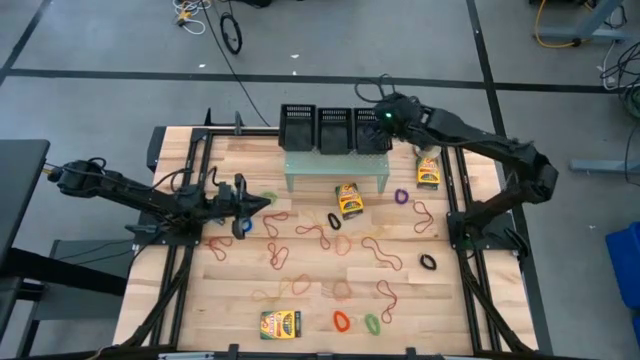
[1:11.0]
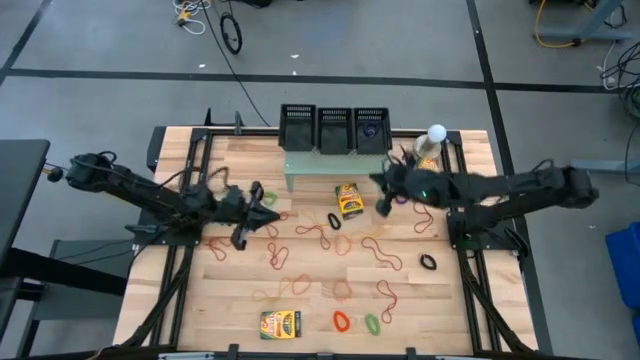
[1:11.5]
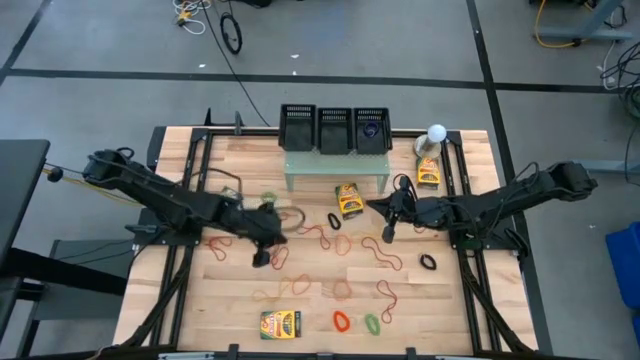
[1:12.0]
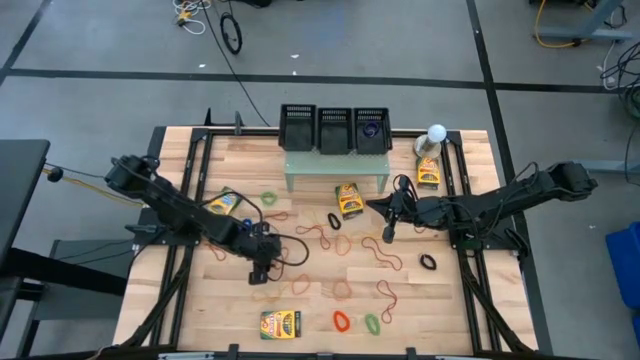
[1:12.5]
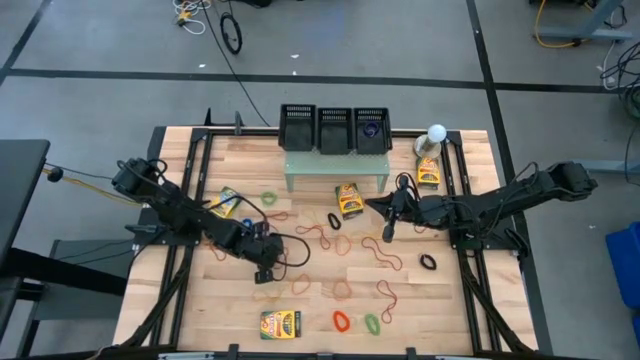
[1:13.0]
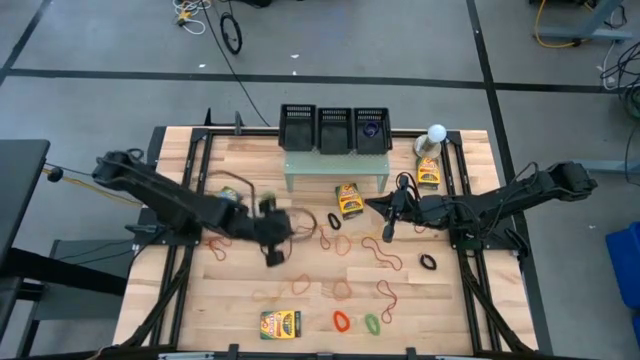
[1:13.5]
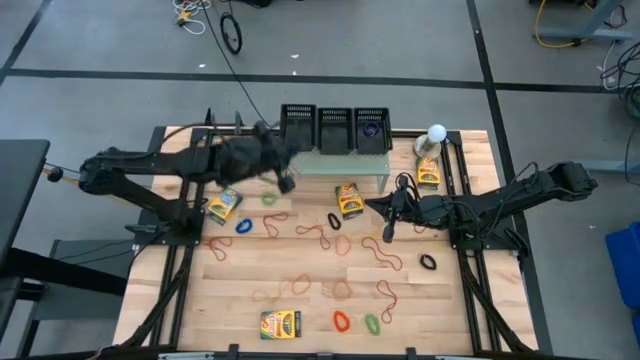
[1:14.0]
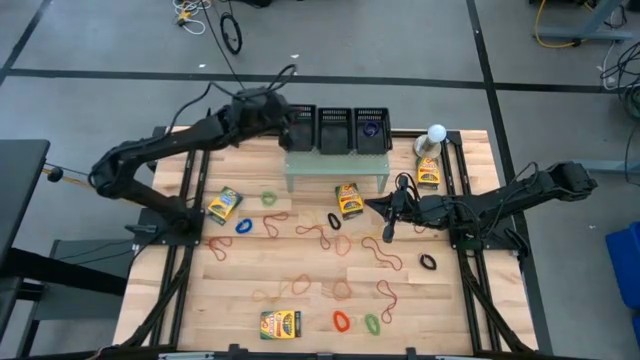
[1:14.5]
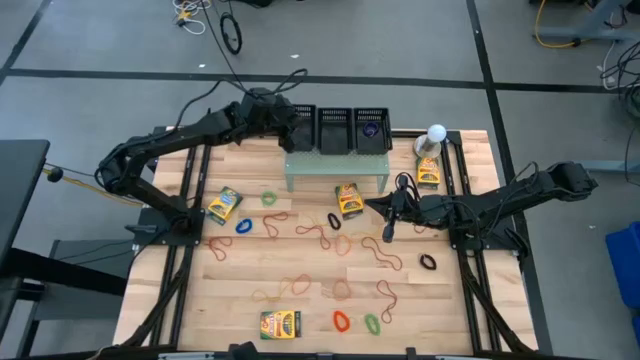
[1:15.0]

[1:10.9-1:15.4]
Task: Pick & Place Office Desk Supplies
Put the red rubberband into the left black bin on the shelf

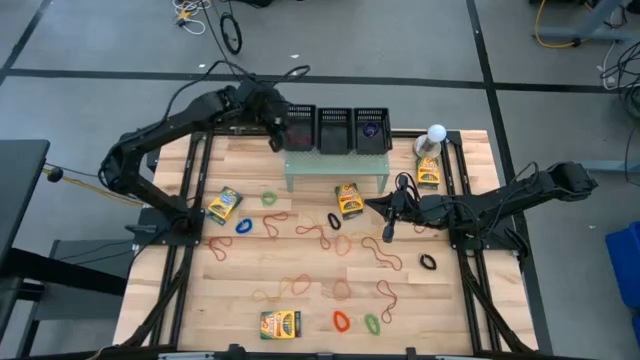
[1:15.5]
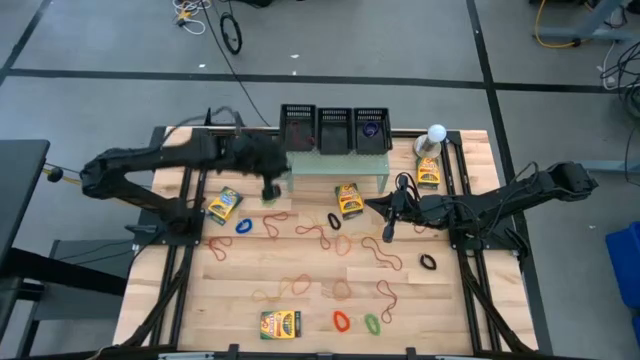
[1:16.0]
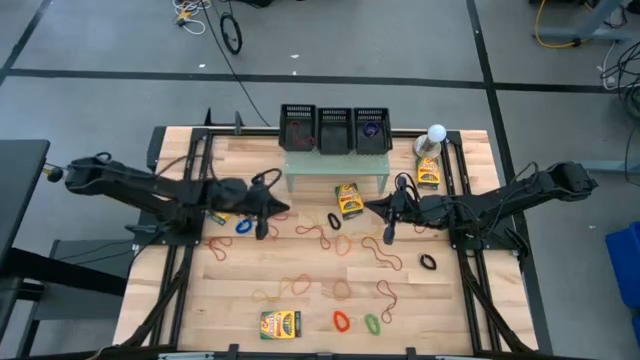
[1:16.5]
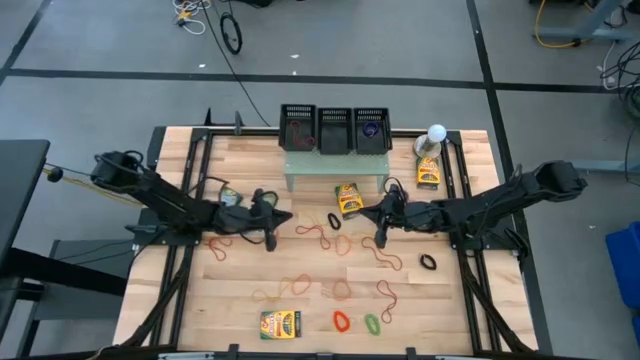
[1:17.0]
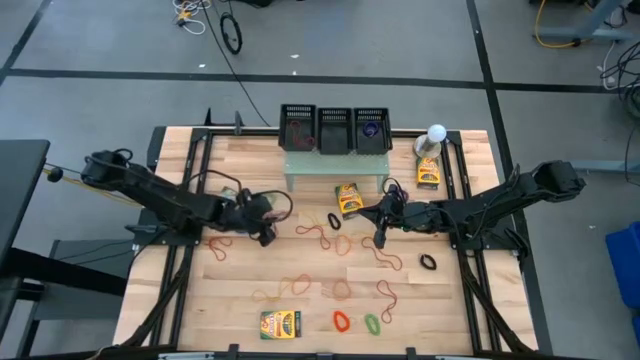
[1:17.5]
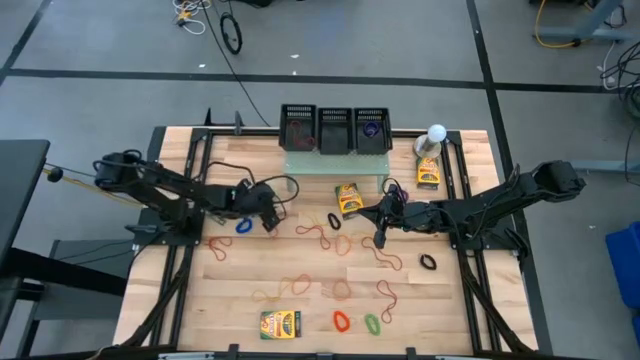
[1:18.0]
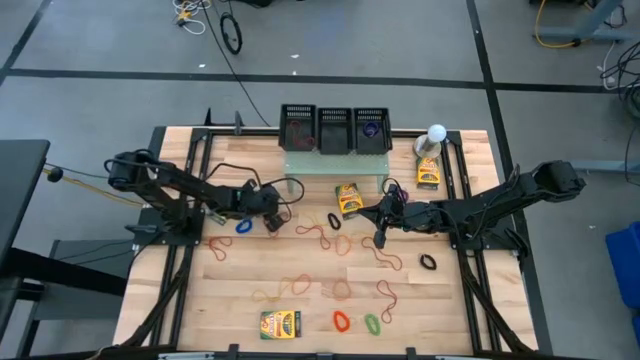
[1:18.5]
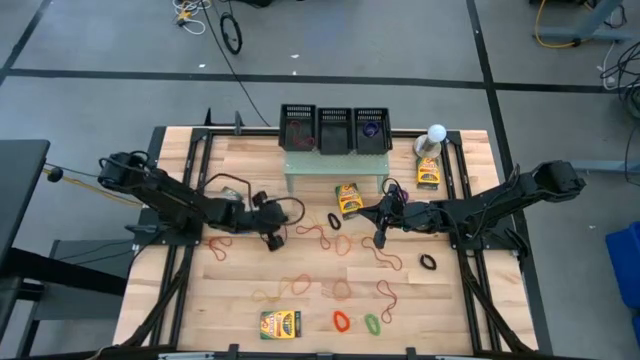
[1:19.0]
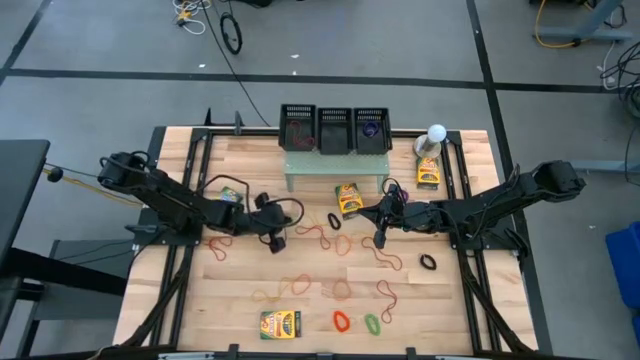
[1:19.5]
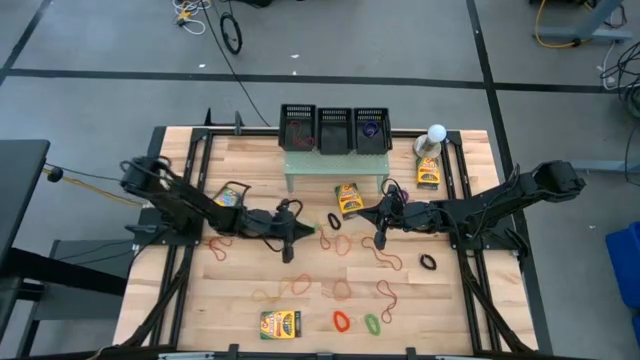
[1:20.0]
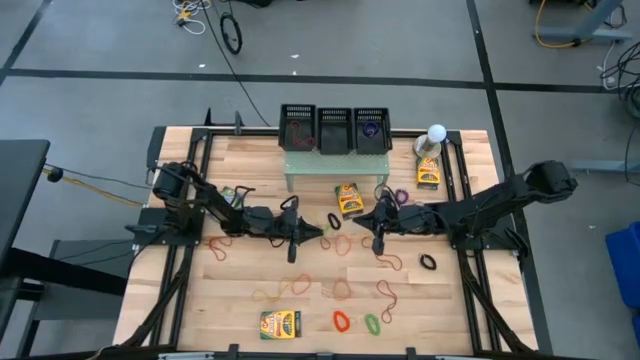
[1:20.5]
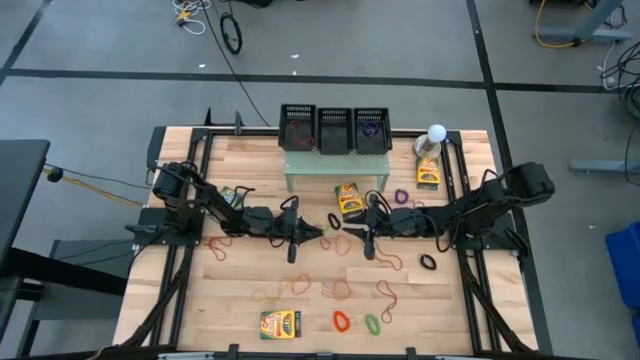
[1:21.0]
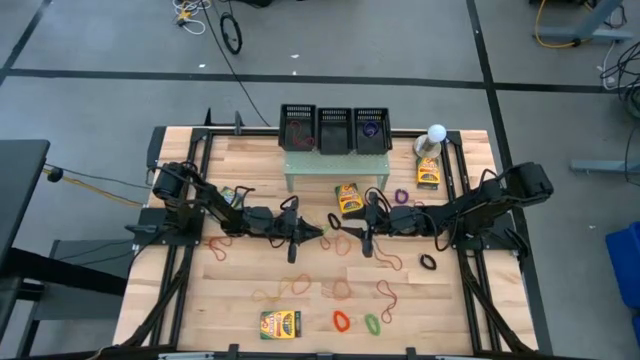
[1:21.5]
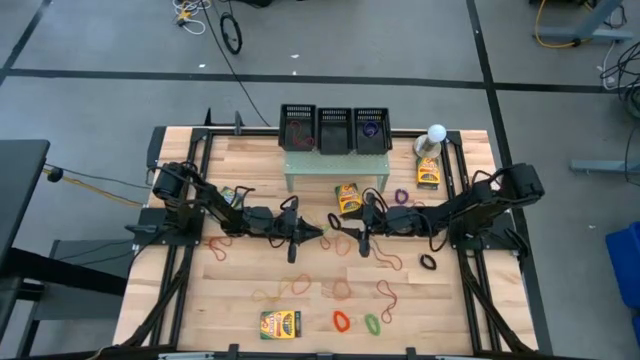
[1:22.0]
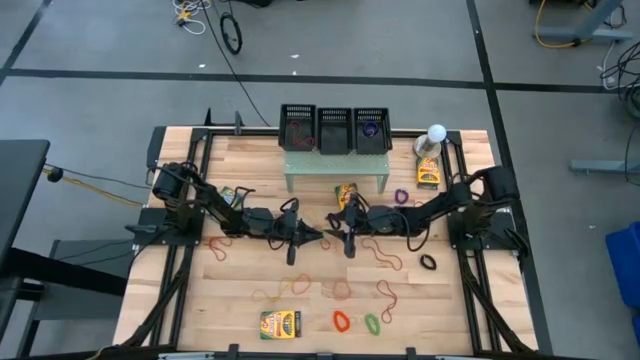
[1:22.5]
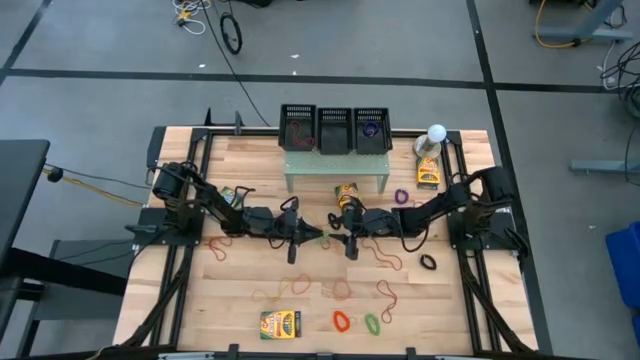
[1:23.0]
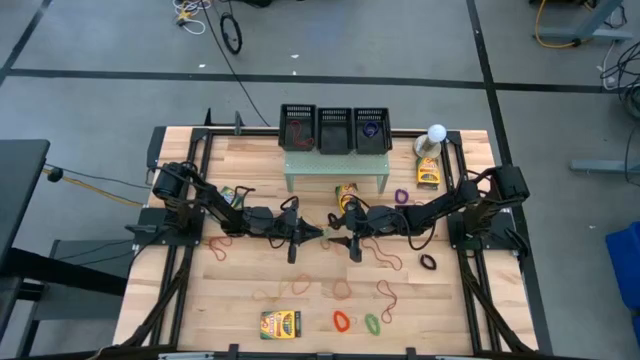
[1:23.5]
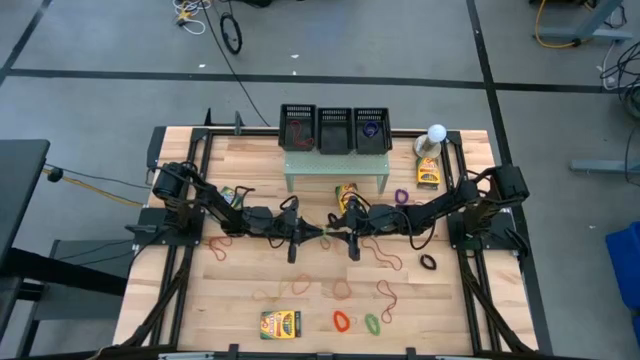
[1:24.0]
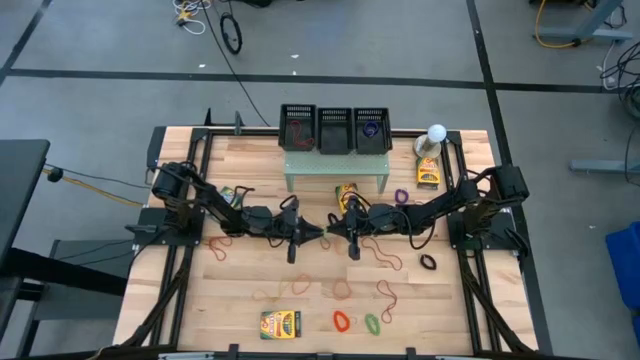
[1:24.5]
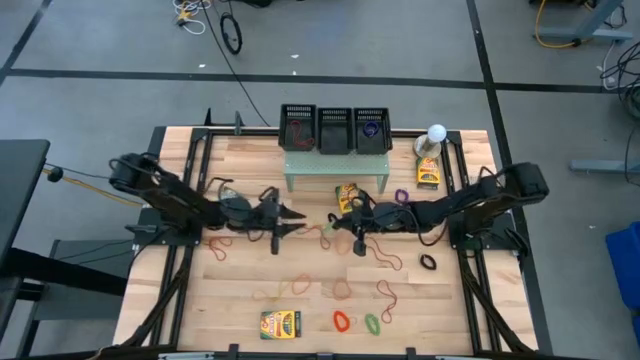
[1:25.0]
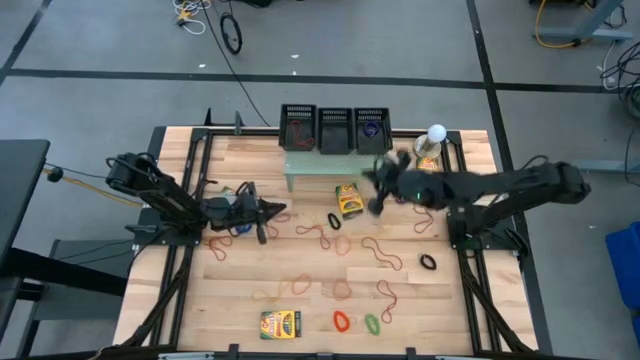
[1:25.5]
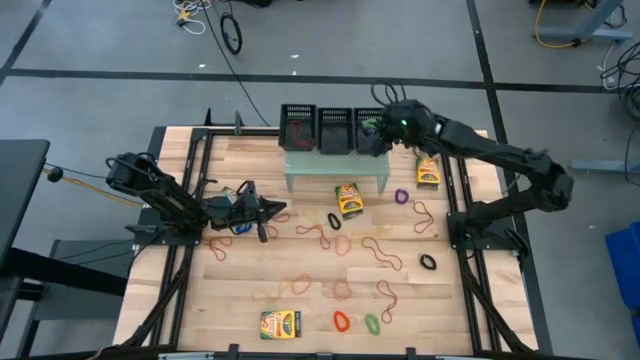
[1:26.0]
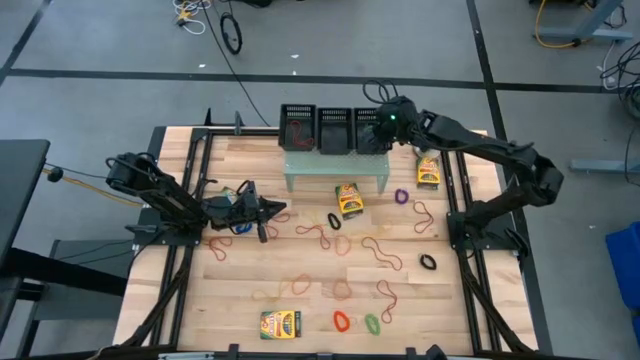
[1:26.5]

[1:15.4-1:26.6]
Put the green spring bracelet into the right black bin on the shelf

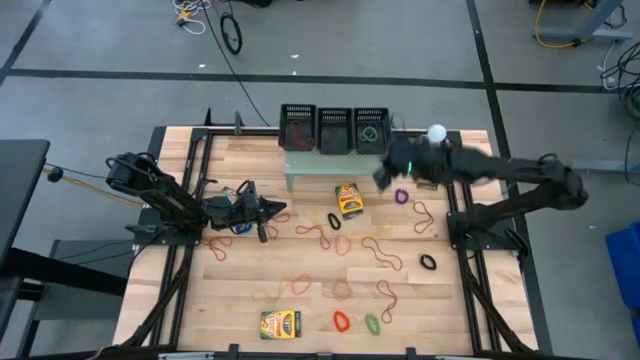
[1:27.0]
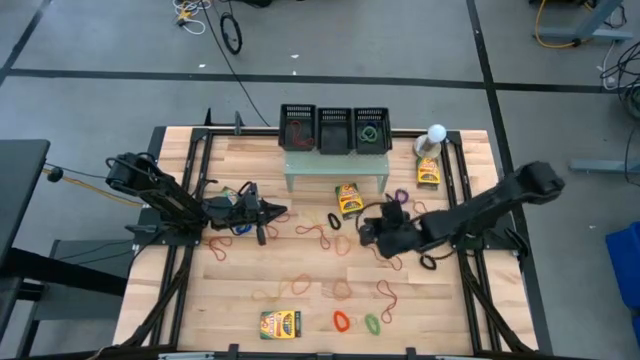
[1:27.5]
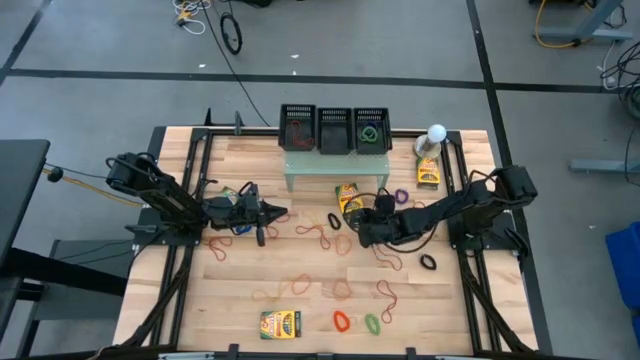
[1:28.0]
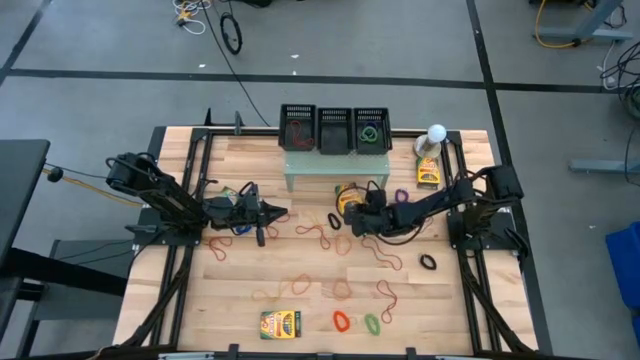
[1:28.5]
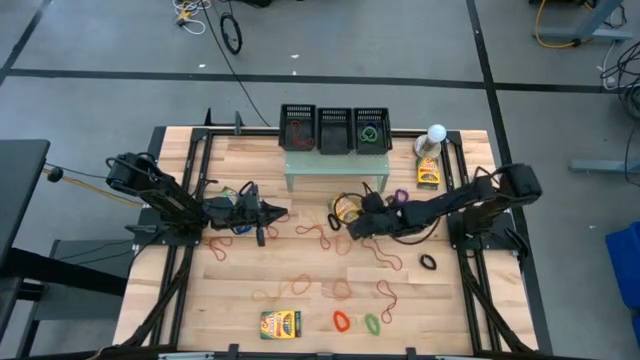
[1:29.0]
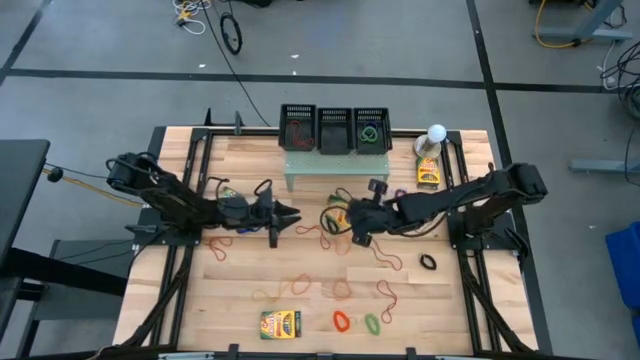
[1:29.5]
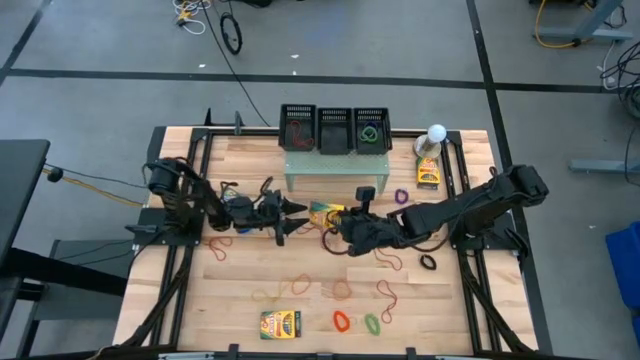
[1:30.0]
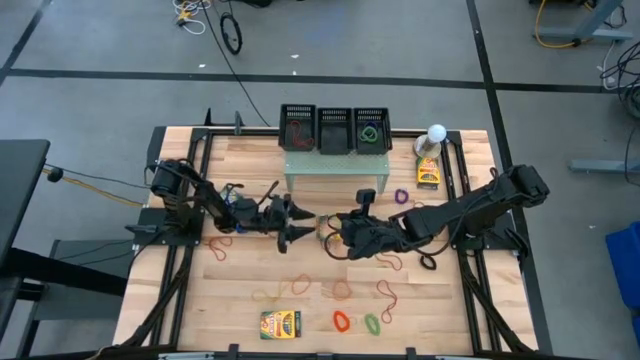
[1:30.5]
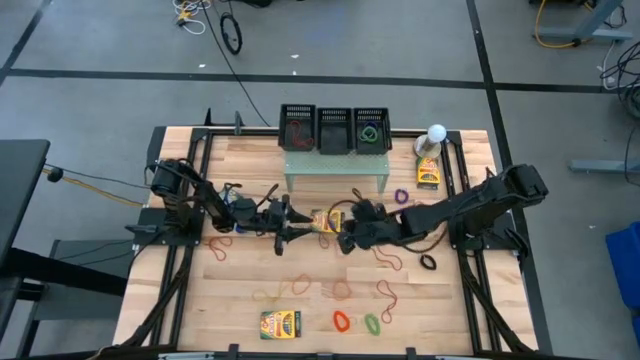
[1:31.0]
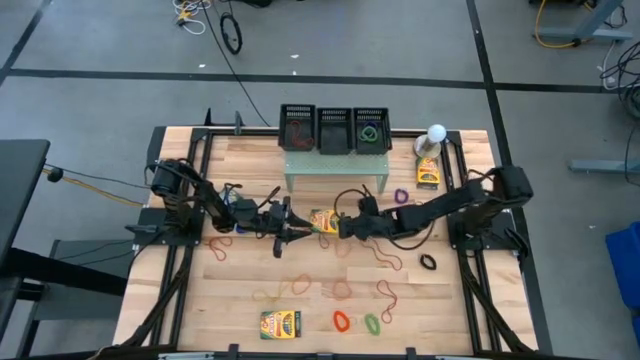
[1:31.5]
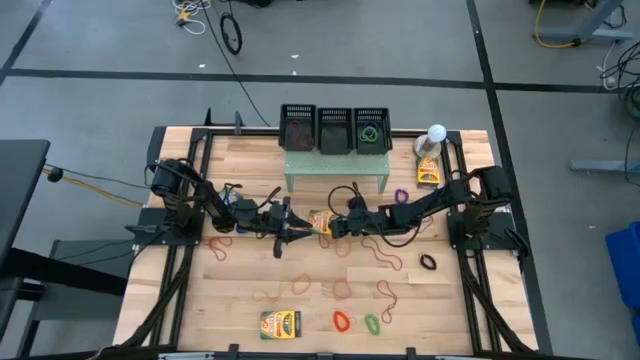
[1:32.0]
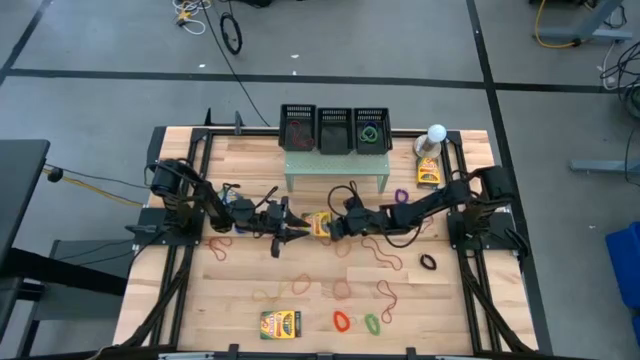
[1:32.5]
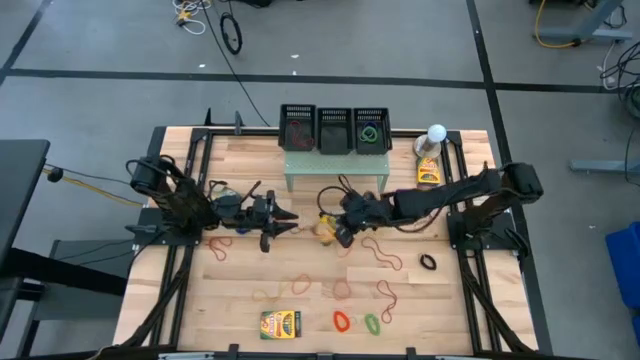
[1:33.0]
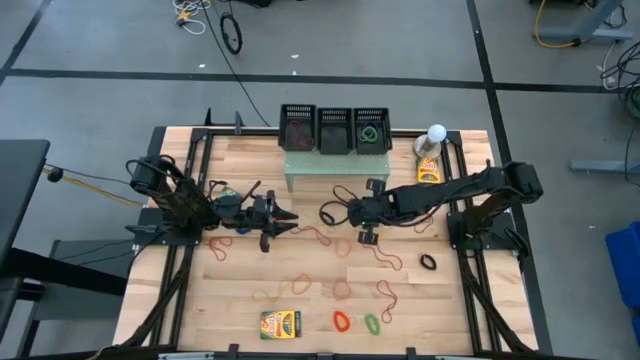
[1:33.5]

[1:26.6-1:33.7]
Put the crayon box on the middle bin on the shelf
